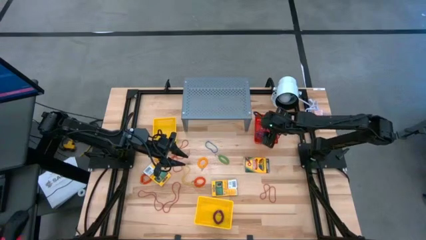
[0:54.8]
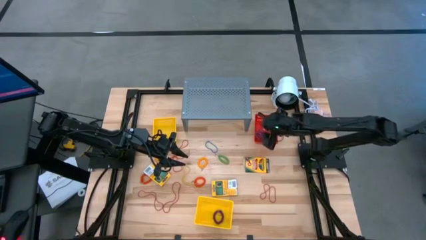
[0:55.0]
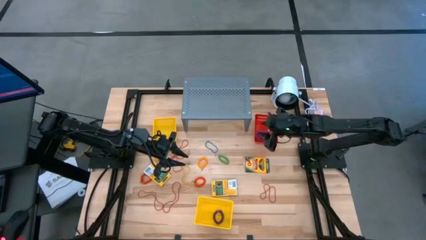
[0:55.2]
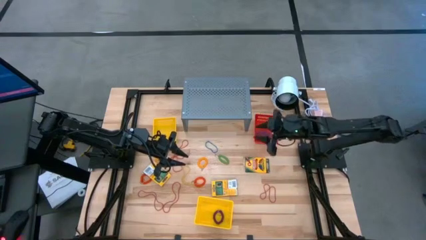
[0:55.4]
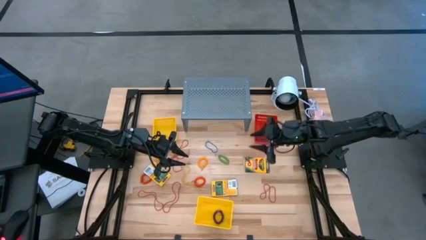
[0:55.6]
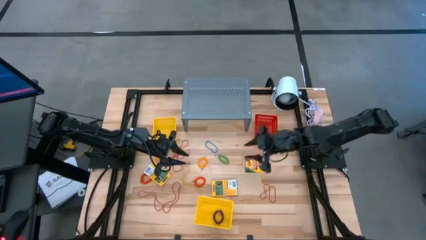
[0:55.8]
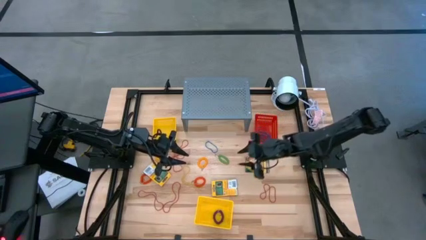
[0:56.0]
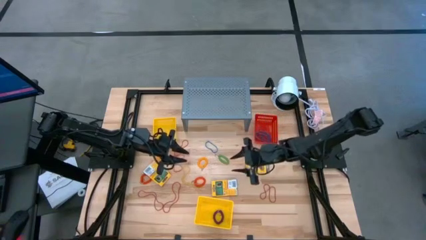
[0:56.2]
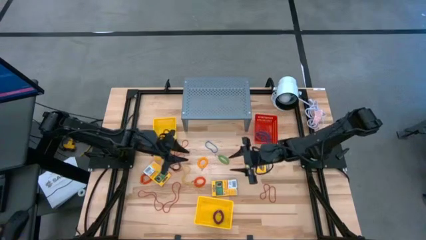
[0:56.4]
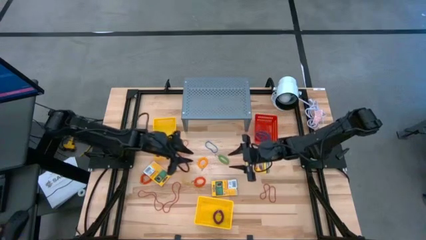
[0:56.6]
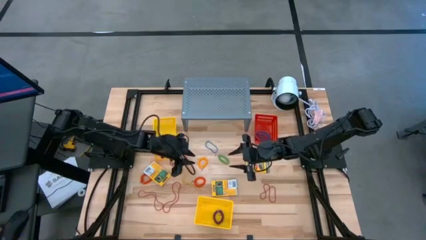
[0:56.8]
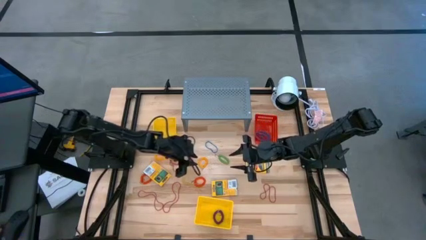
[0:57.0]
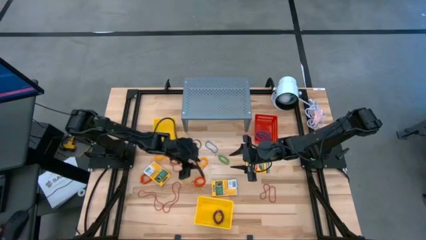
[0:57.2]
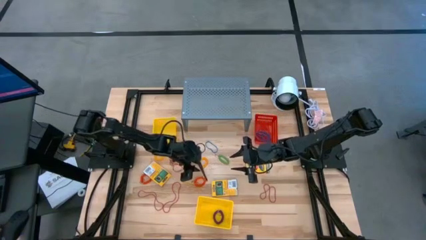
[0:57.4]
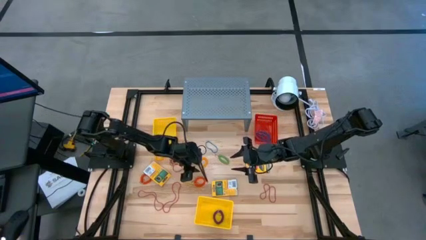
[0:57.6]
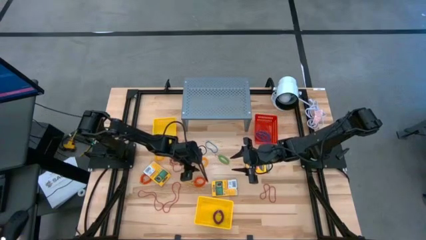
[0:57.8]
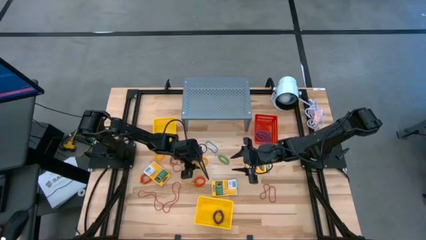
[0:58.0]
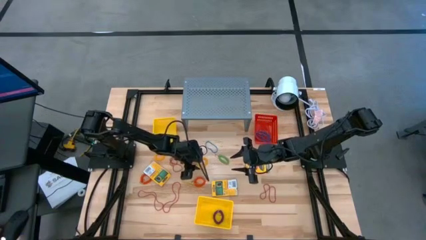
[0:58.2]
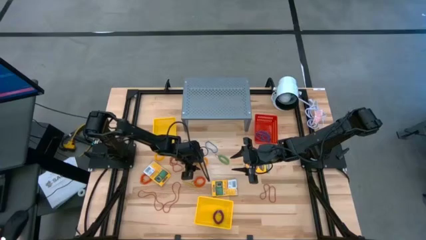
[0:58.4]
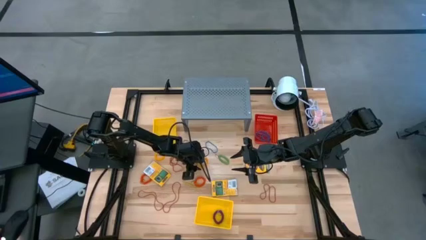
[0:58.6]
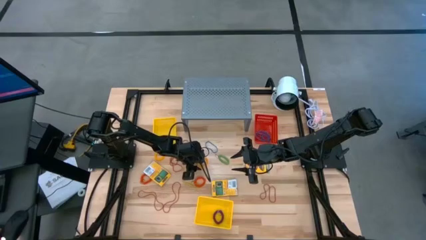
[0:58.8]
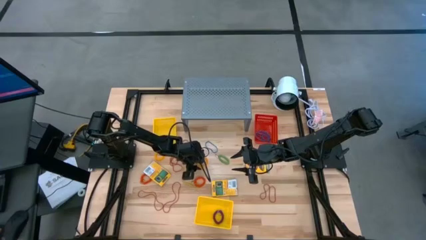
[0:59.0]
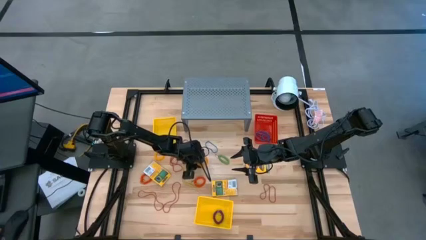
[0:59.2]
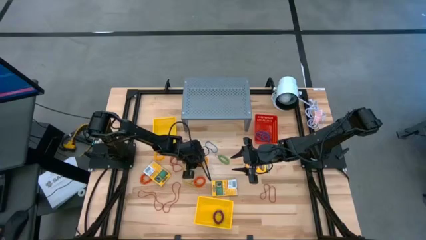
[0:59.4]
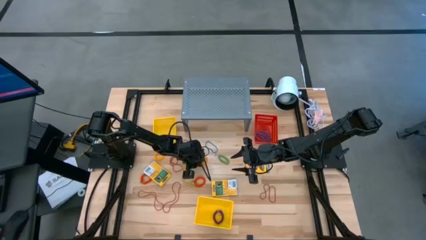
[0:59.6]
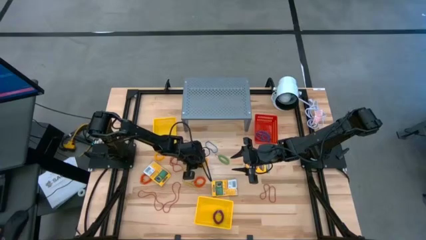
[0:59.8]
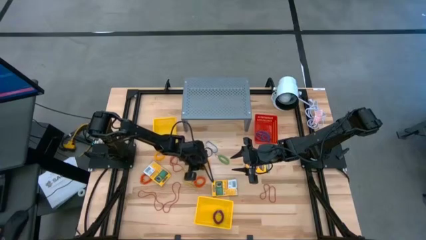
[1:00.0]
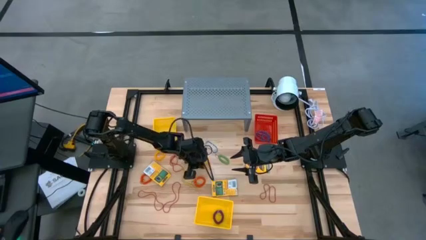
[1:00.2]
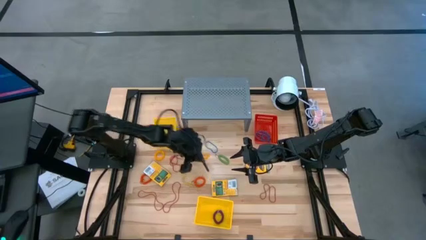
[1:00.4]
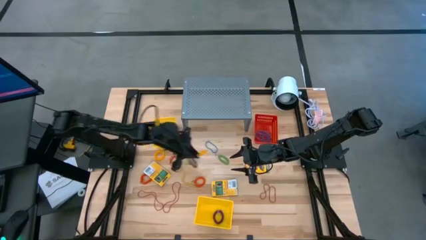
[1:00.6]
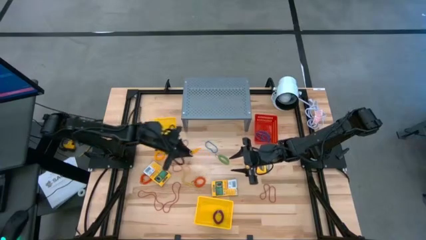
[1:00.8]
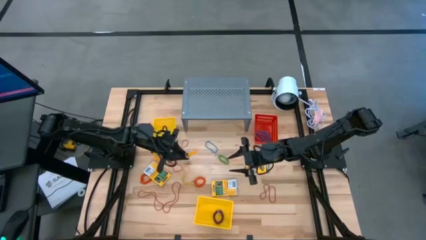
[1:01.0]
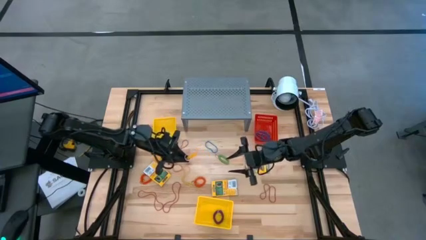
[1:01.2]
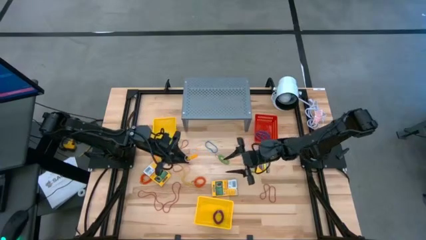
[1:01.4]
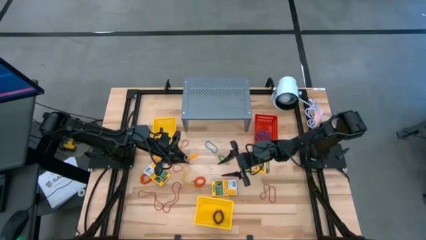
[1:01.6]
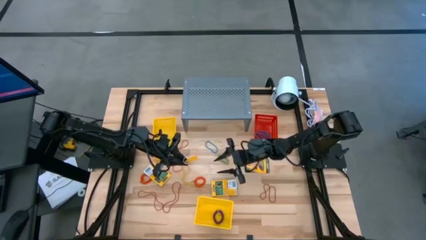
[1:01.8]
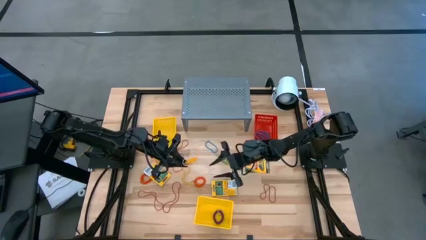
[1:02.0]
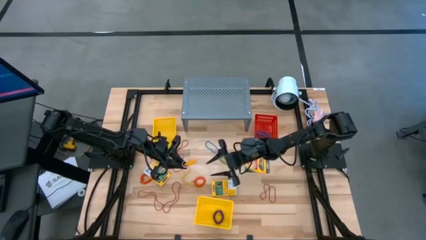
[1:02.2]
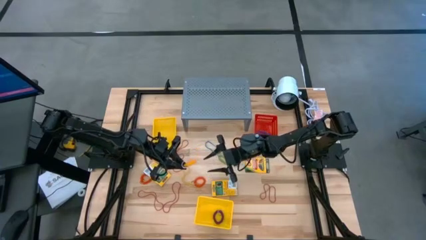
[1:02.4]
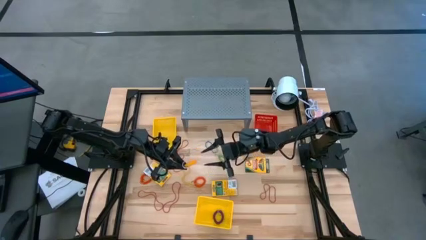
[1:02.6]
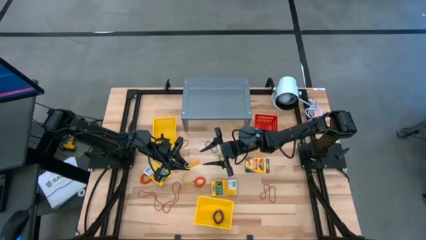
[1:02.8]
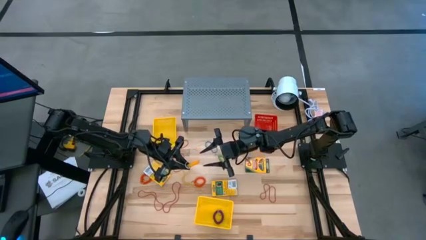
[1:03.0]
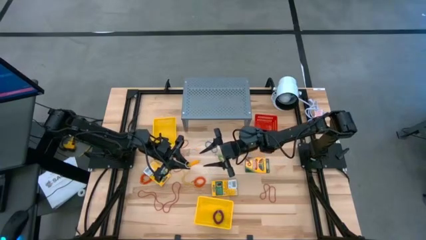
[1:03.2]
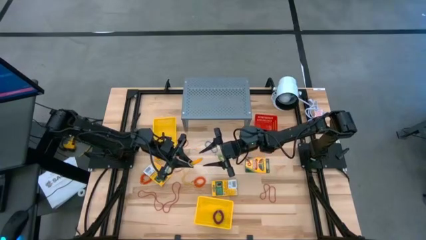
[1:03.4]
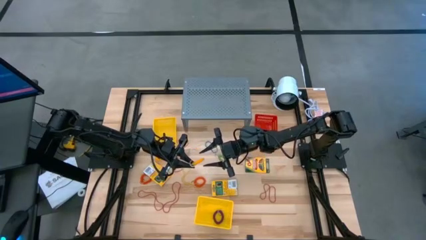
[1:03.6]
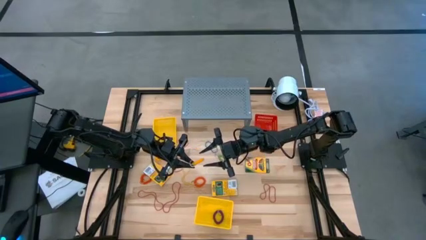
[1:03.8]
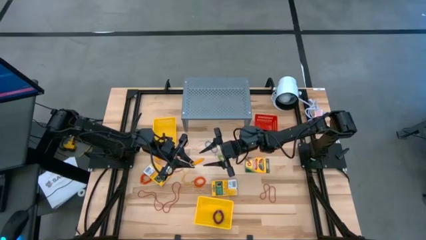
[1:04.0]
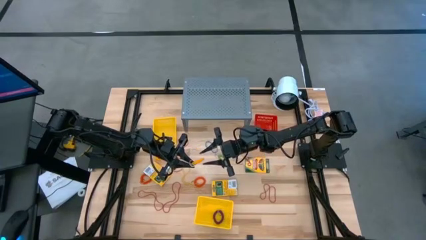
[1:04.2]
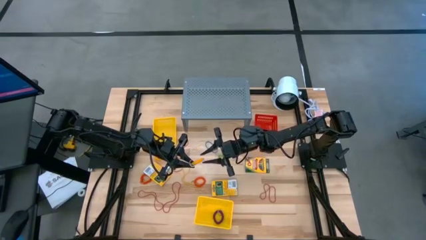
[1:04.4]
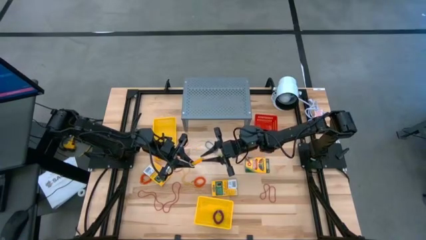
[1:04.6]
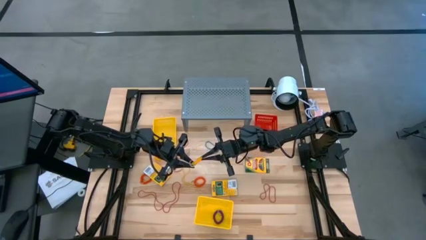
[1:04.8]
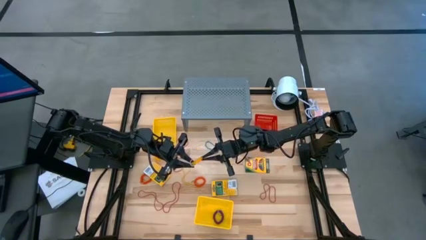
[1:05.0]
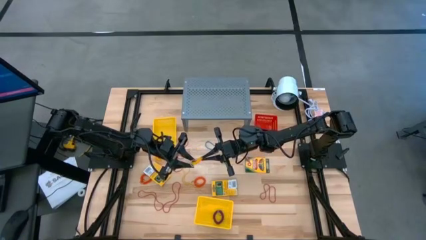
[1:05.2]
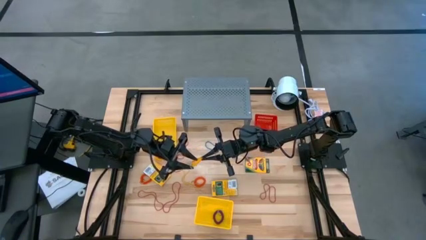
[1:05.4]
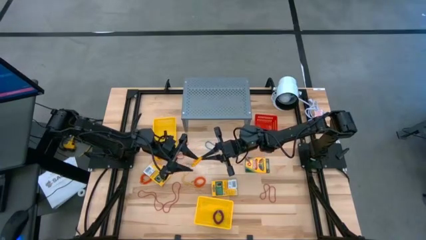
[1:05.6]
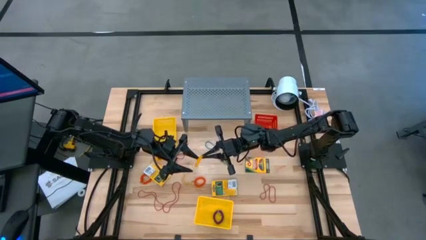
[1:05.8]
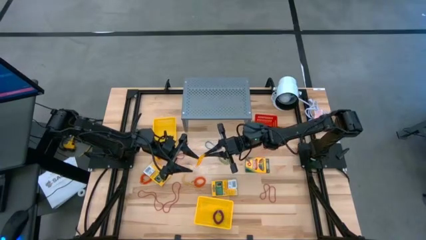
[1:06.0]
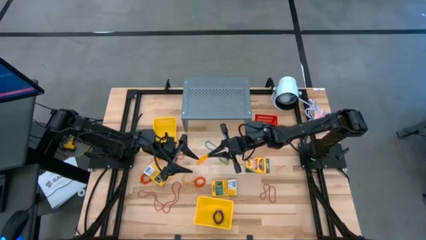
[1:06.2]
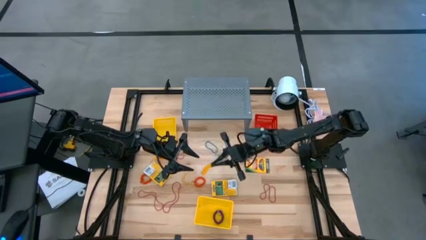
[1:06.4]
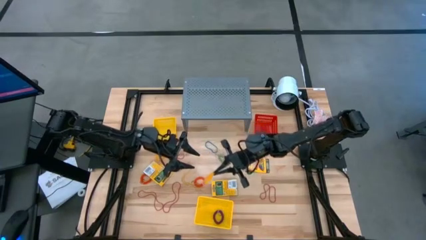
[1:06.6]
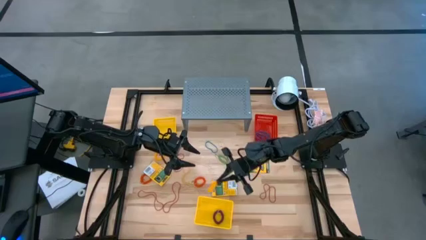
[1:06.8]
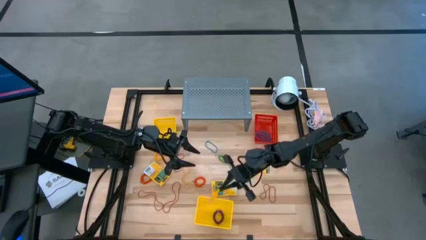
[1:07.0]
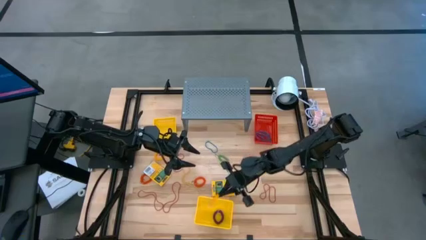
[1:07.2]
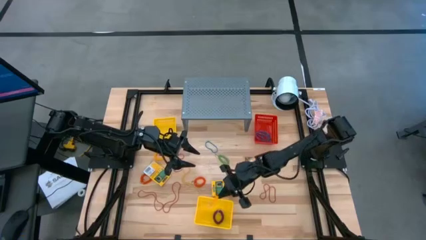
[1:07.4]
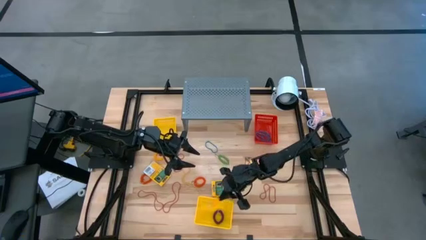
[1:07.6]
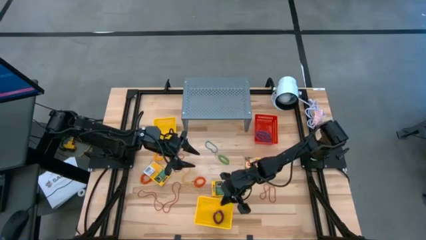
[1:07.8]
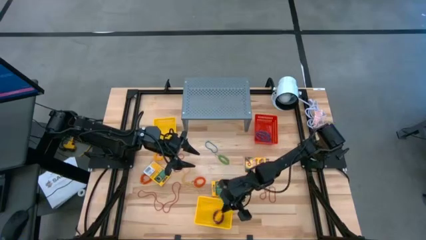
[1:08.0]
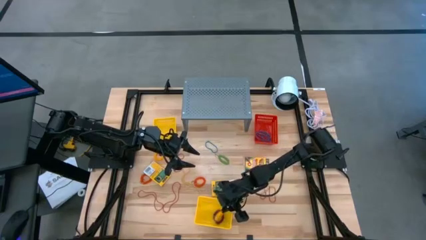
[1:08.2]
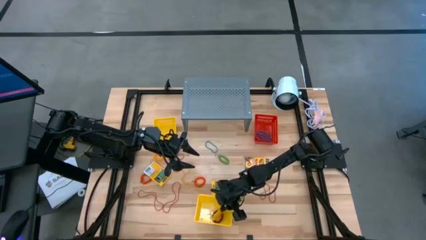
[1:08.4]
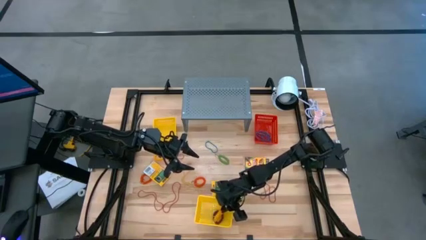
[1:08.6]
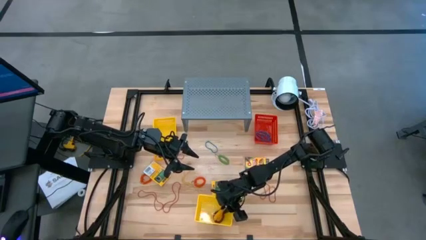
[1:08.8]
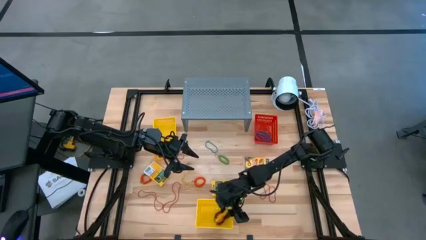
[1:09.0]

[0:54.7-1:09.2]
Task: Pick & Place Office Desk Supplies
Put the yellow spiral keychain into the bottom yellow bin
